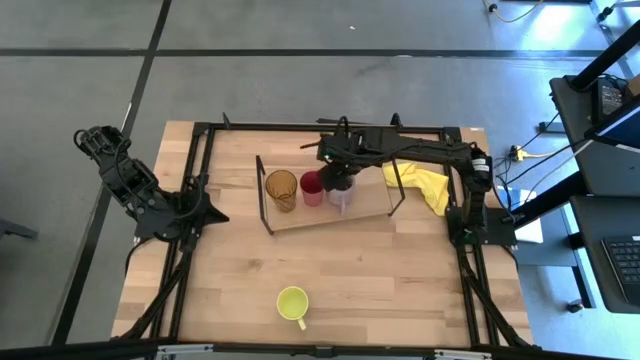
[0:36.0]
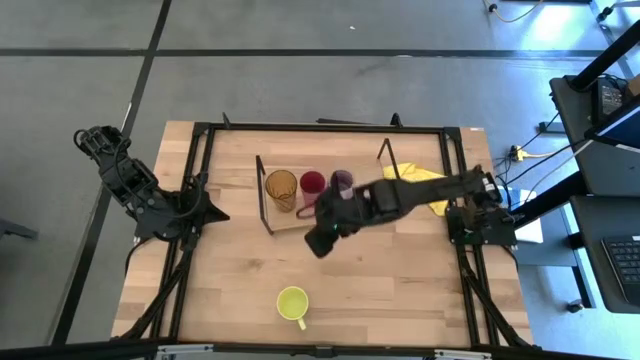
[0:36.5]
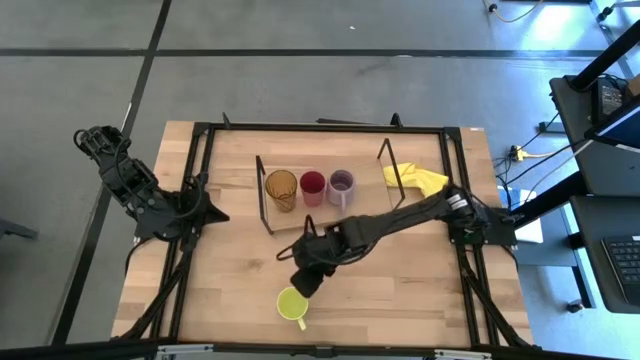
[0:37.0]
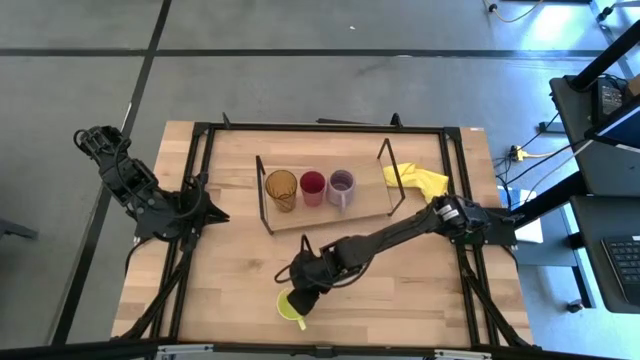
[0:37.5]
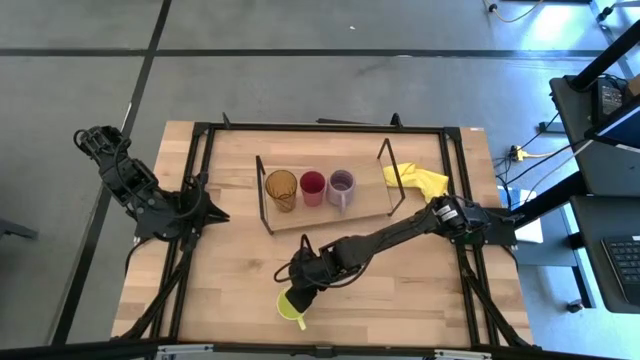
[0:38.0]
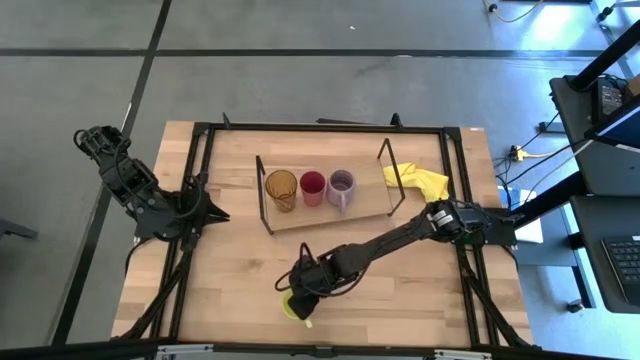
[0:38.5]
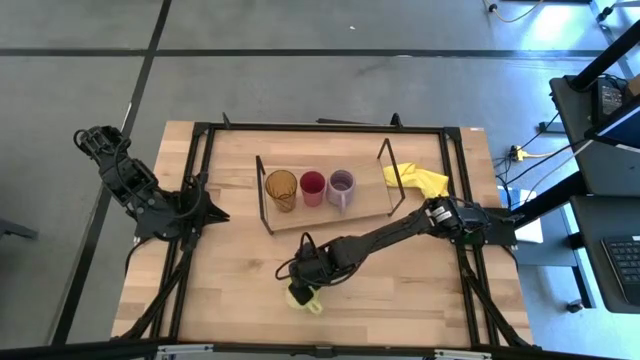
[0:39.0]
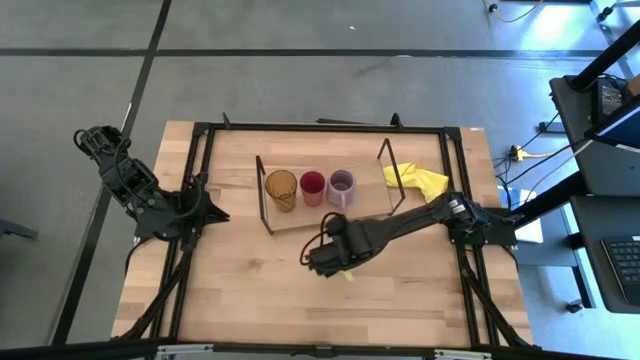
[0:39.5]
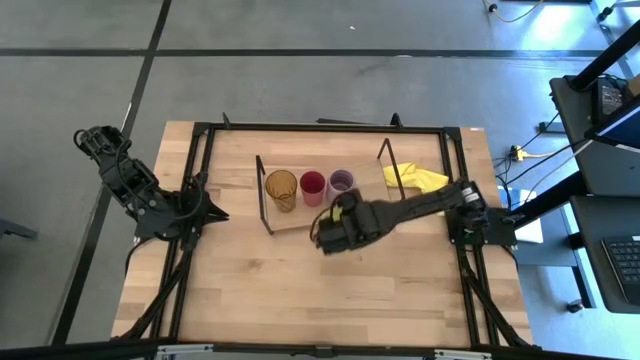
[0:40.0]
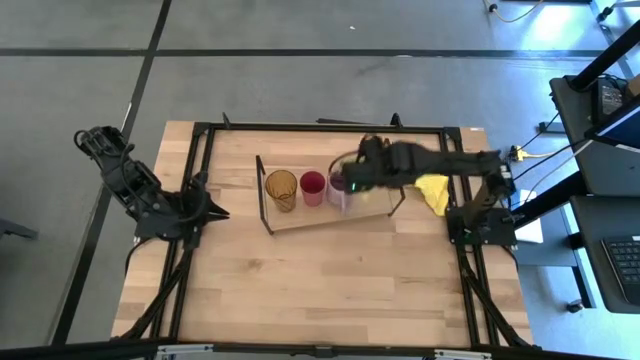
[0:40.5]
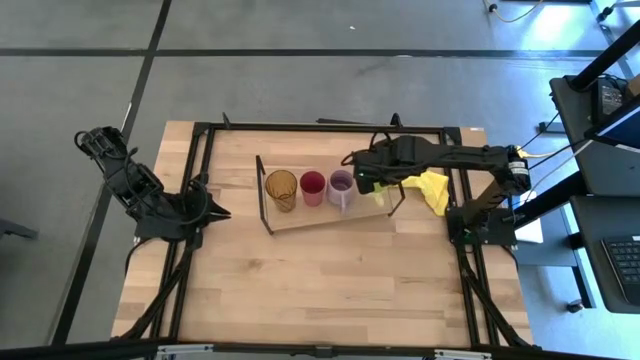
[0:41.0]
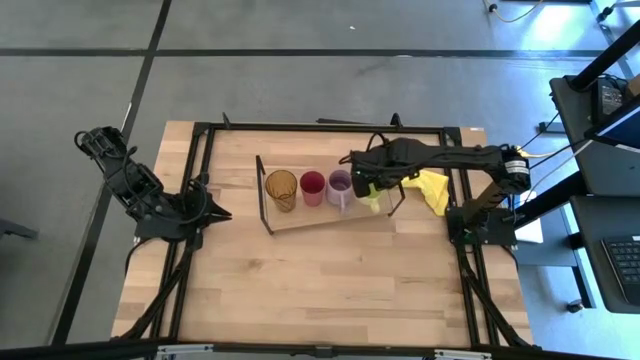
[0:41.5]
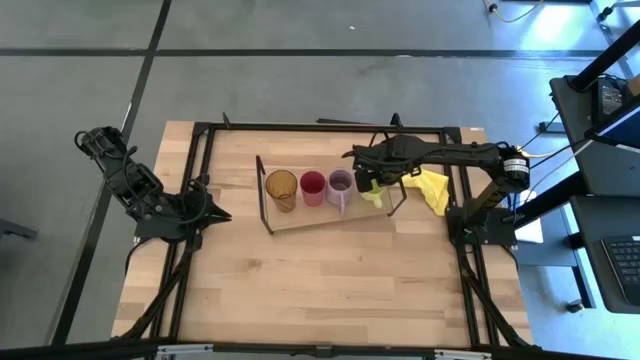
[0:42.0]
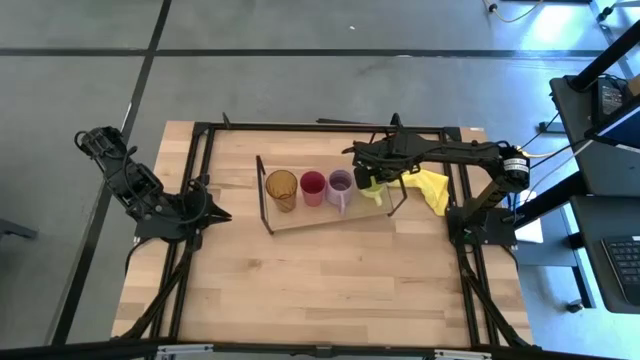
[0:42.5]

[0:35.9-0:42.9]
Task: Stack small to large cups/mugs on shelf
Put the yellow mug on the shelf

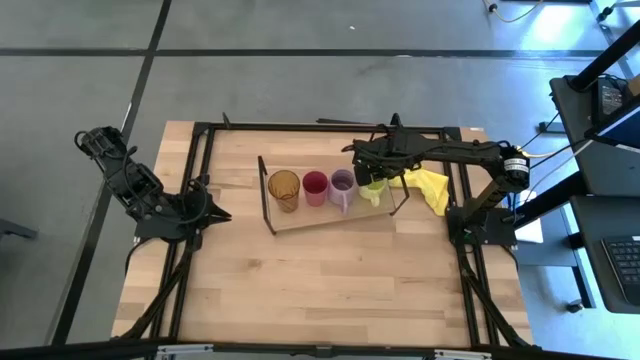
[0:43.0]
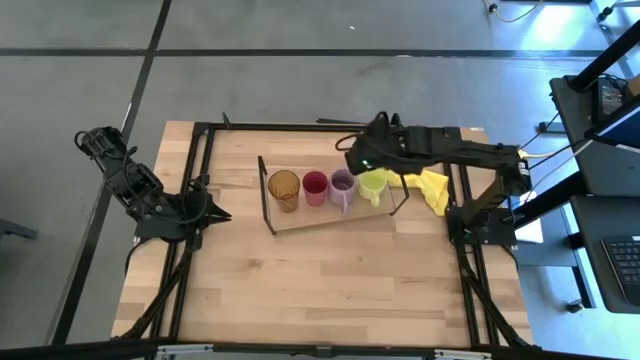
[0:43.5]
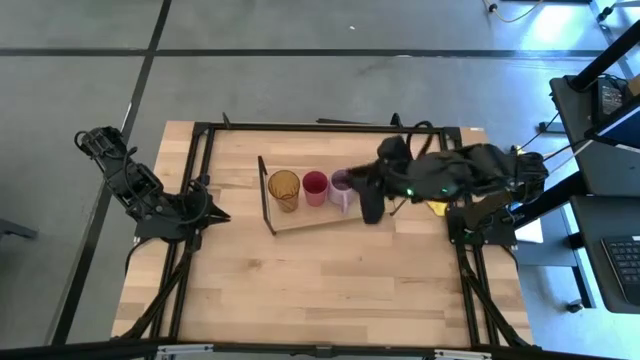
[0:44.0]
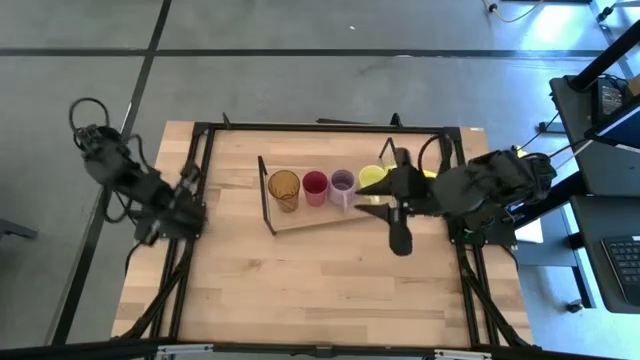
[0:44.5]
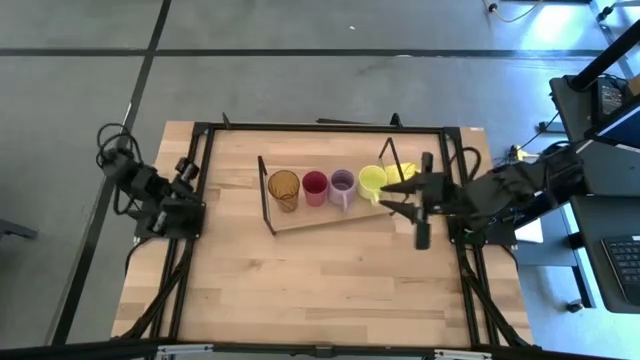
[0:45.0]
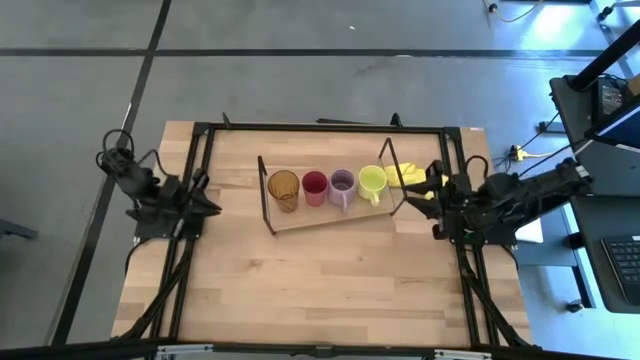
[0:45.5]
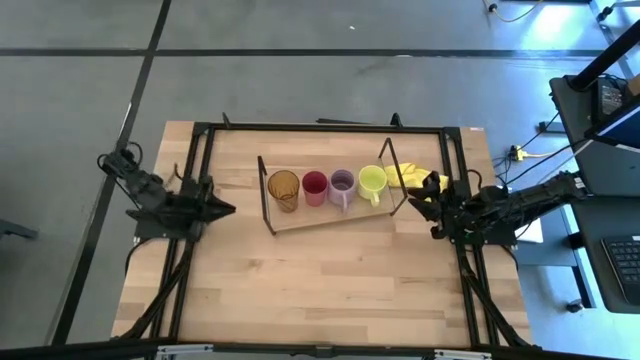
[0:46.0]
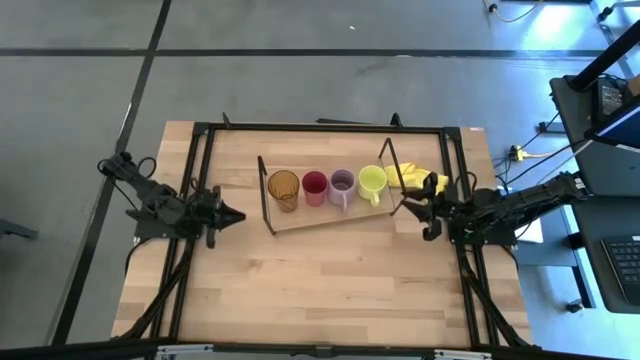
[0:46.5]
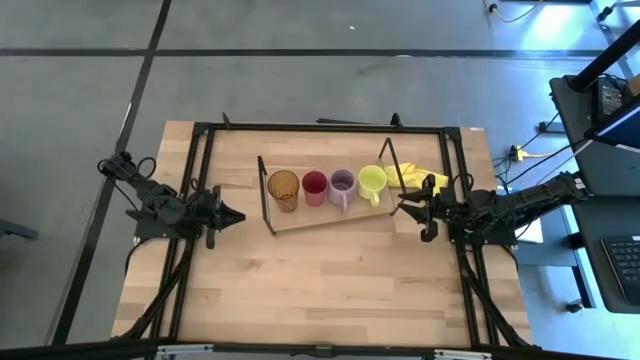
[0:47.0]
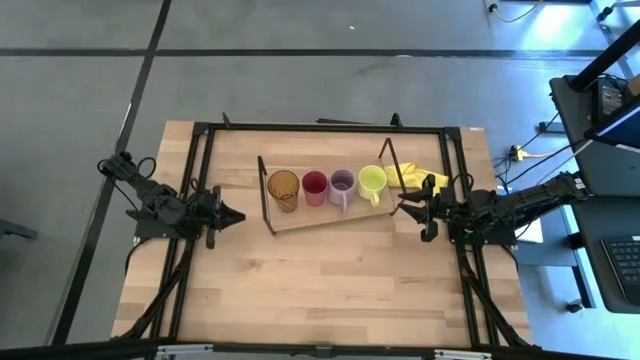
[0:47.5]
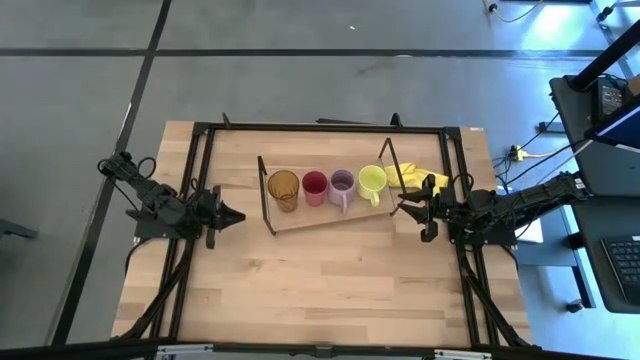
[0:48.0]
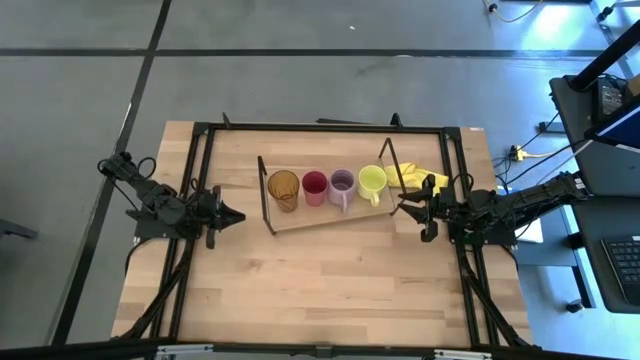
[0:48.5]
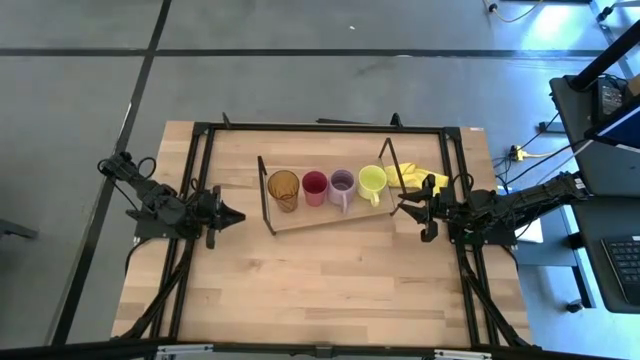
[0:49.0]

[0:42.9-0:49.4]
Return to Home Position

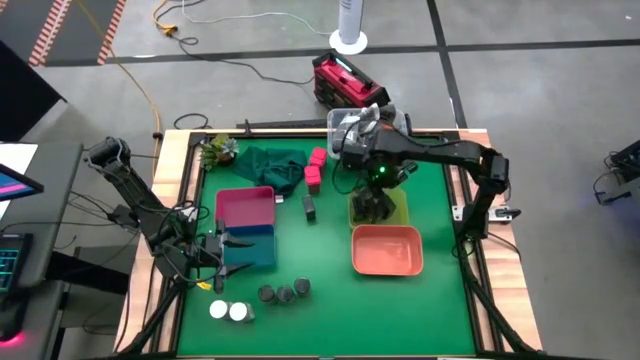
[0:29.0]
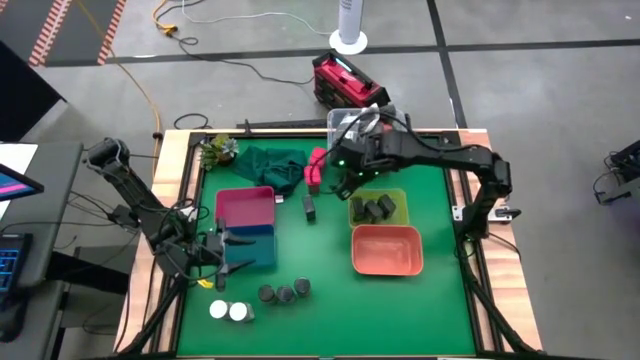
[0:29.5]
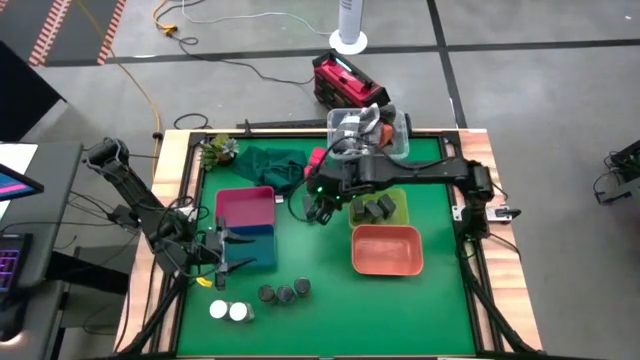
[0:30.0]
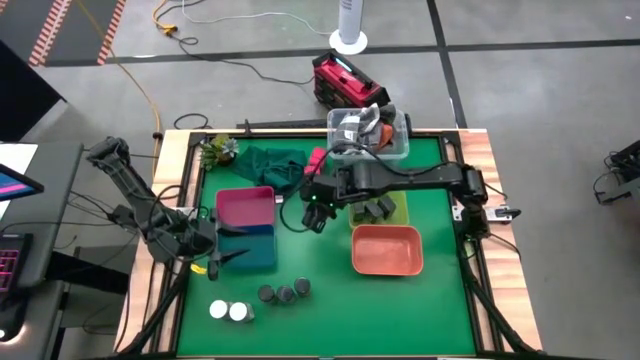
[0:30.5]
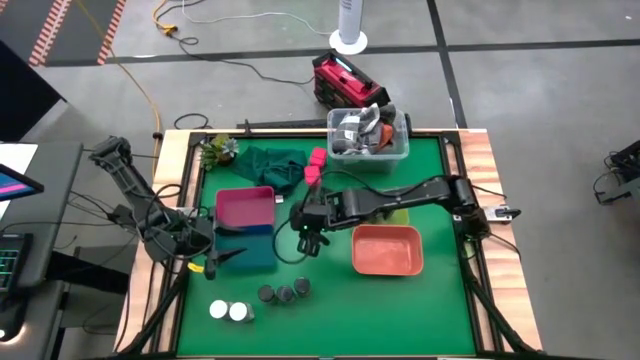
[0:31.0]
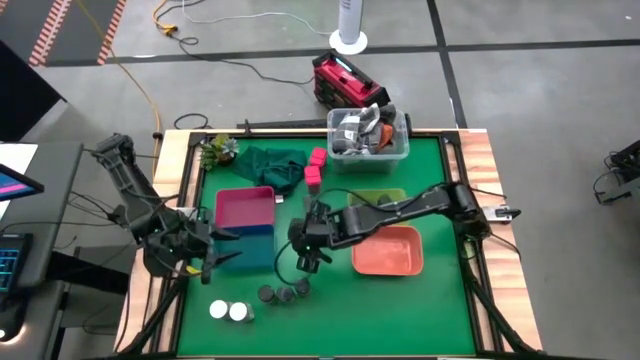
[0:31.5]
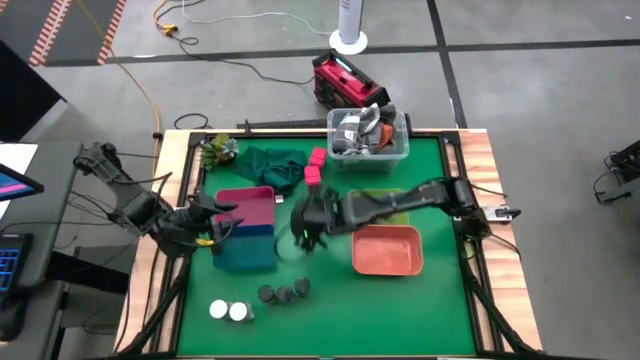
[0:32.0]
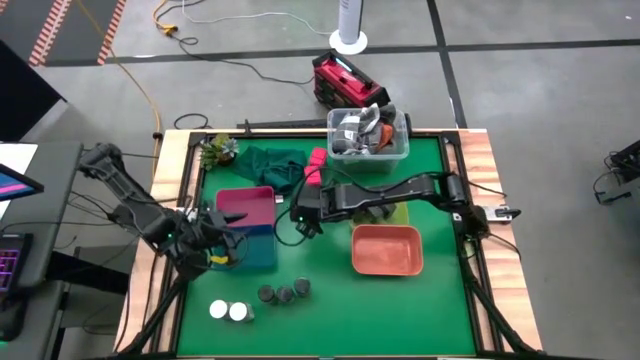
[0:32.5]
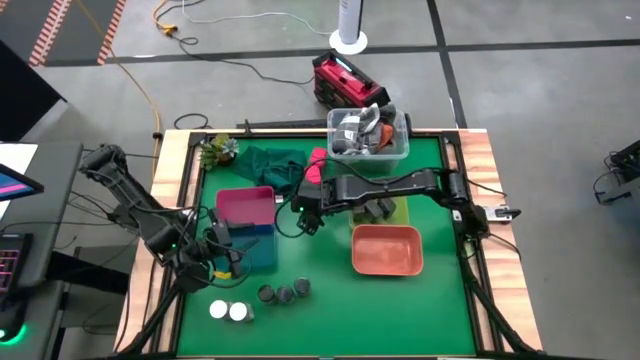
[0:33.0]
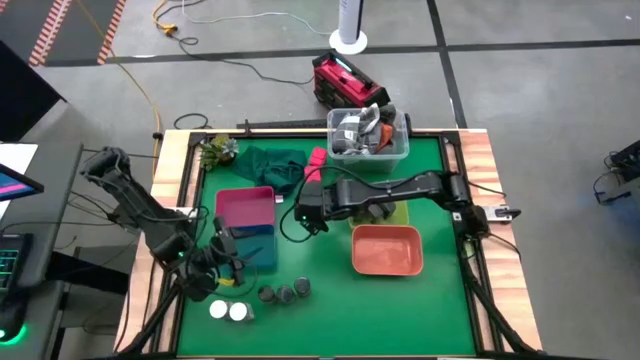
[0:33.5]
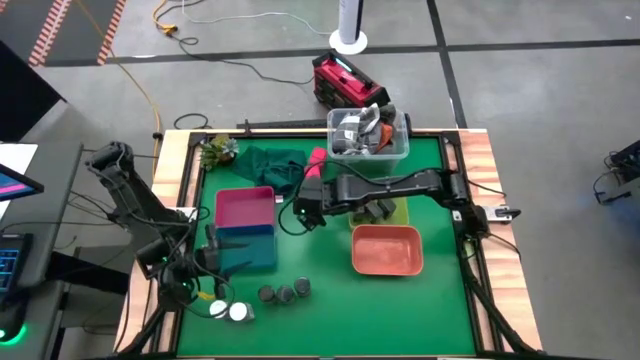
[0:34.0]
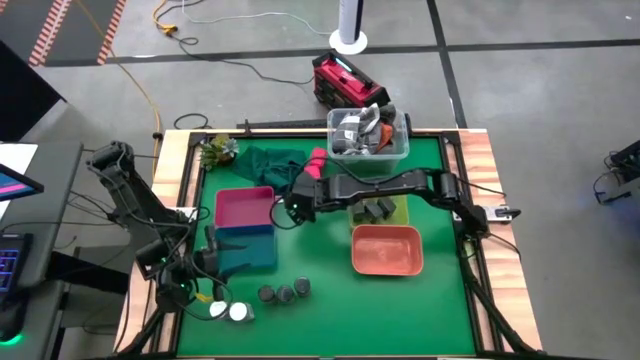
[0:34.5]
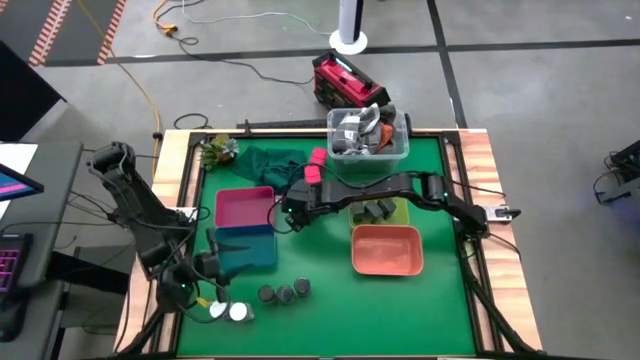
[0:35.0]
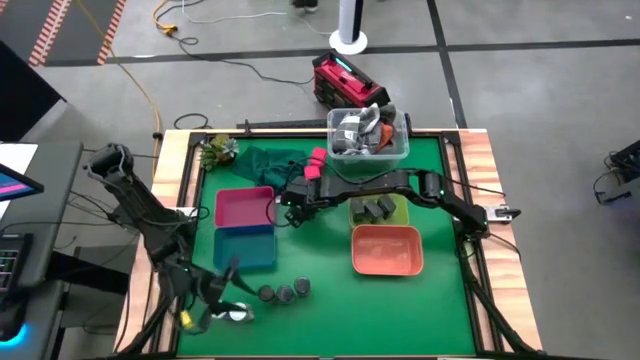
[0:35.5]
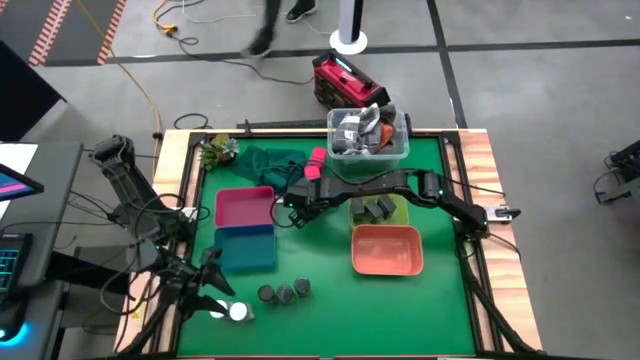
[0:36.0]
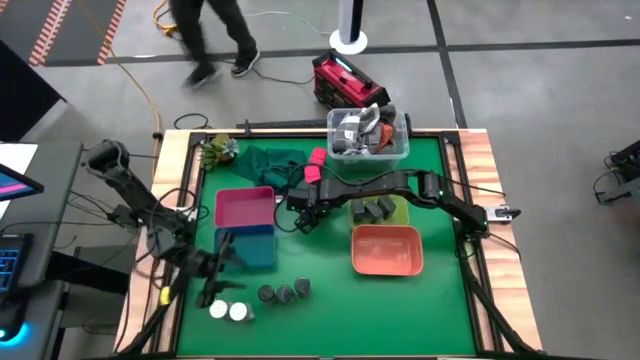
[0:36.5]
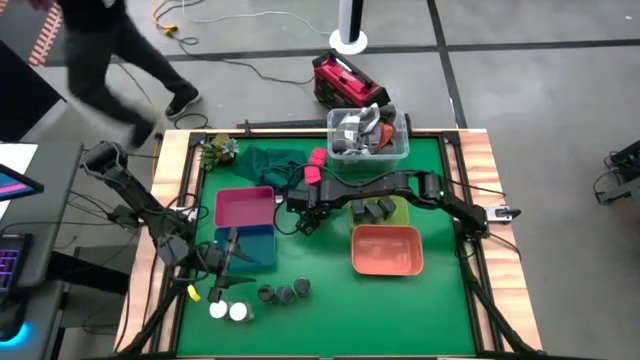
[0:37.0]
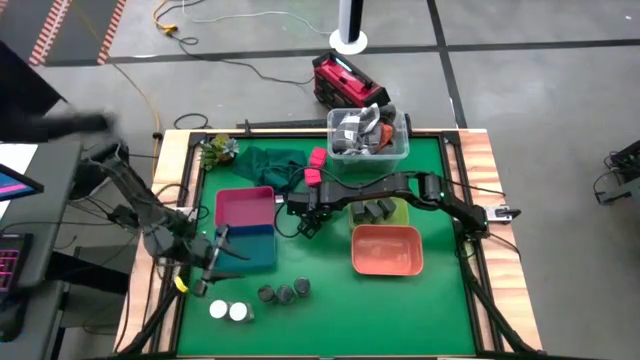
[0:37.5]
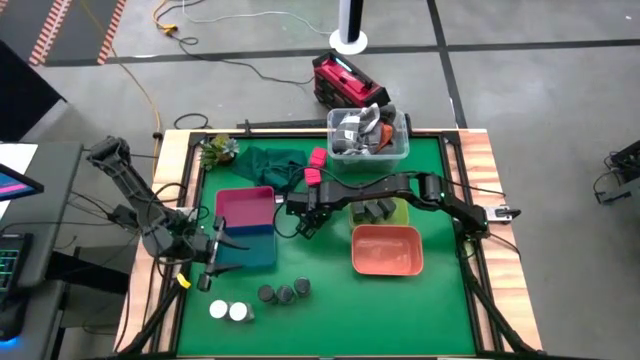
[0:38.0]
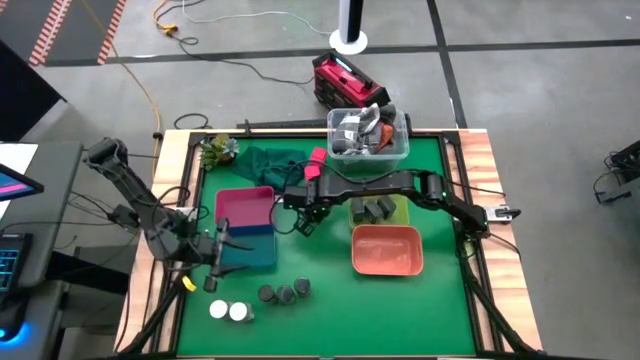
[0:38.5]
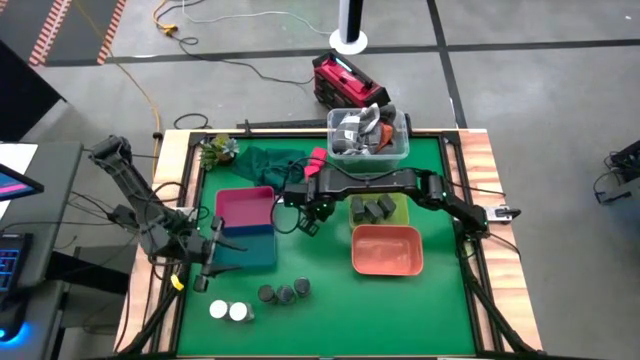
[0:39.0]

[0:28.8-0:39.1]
Task: Sort spices by type
Put the black spice can into the yellow bin
